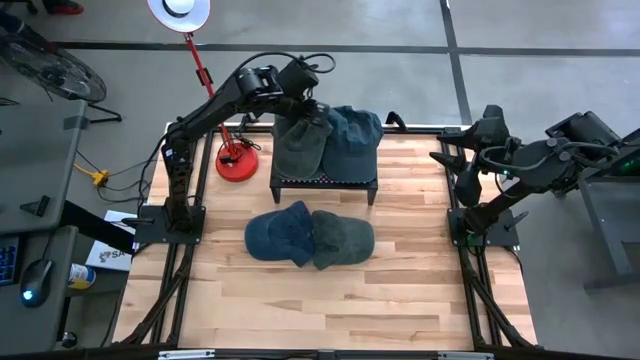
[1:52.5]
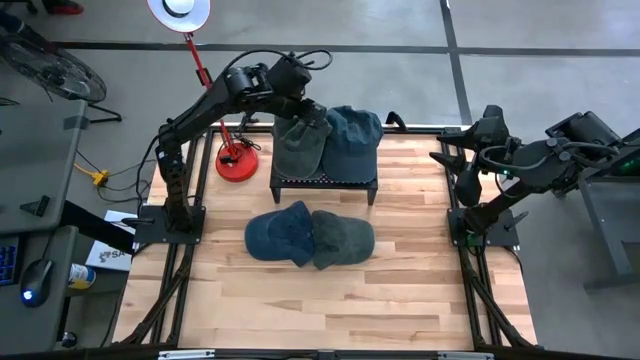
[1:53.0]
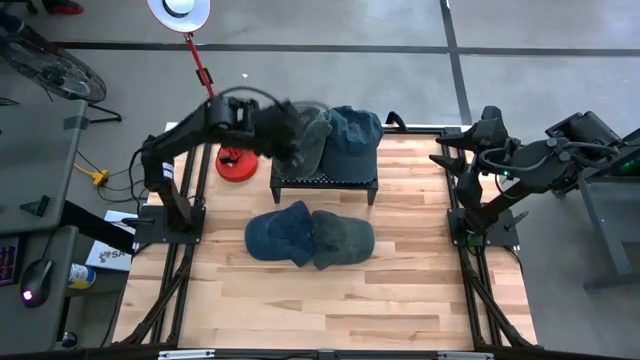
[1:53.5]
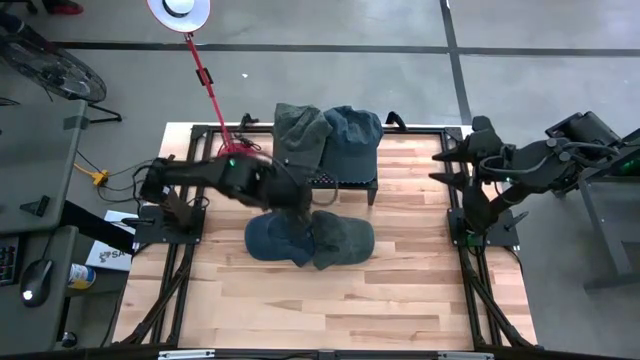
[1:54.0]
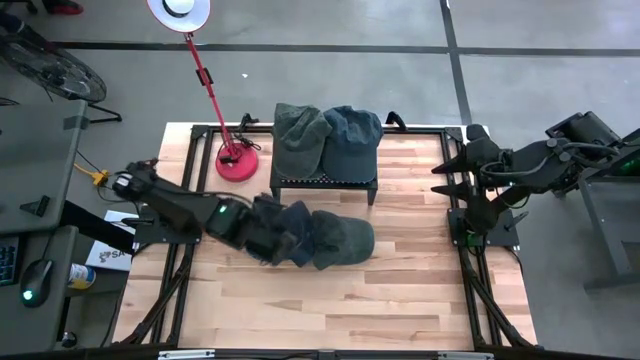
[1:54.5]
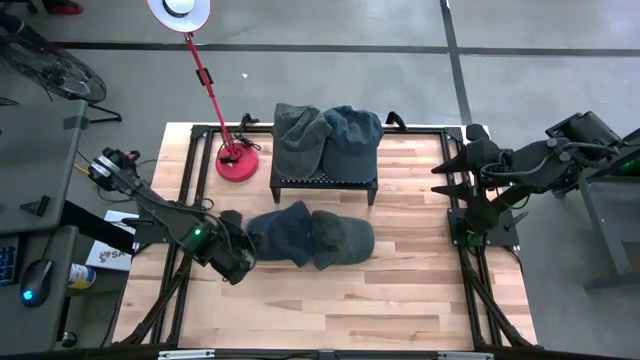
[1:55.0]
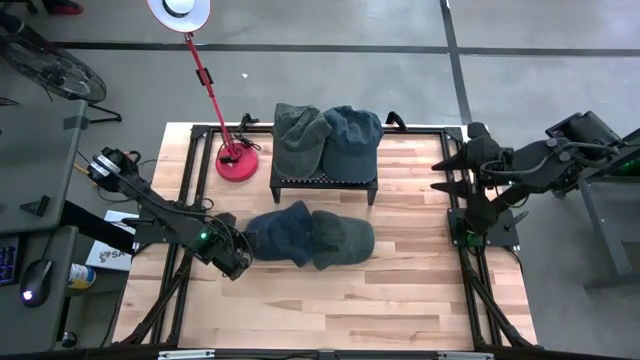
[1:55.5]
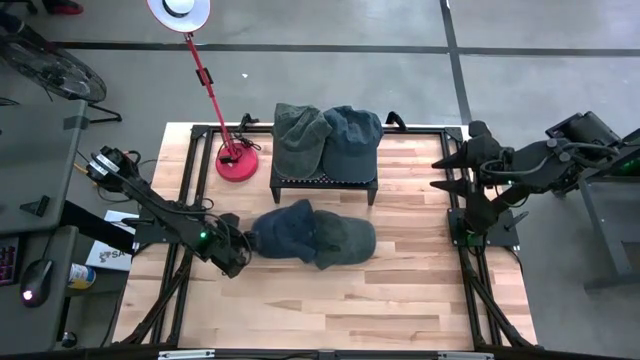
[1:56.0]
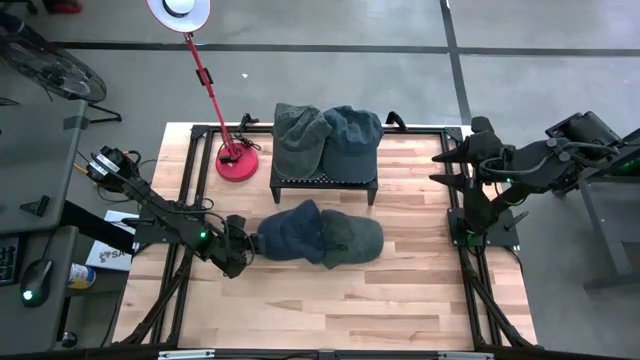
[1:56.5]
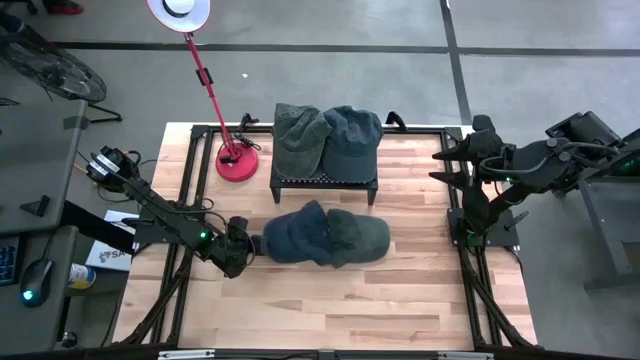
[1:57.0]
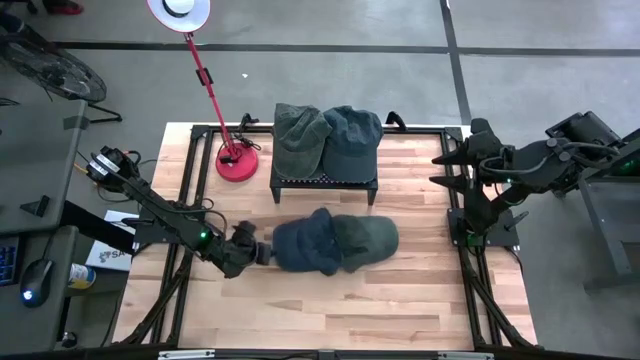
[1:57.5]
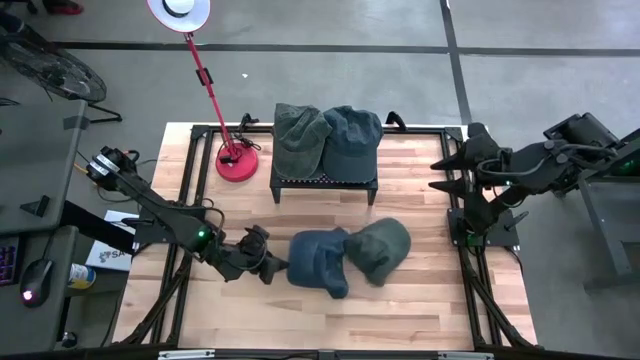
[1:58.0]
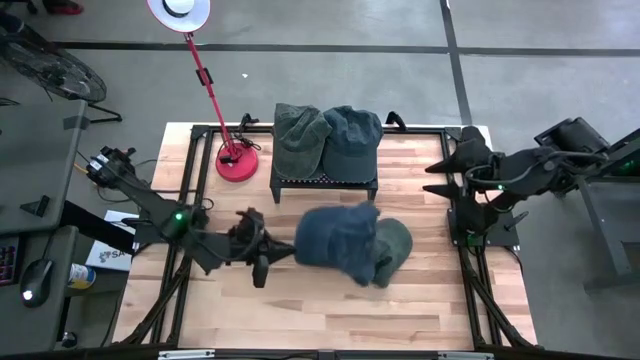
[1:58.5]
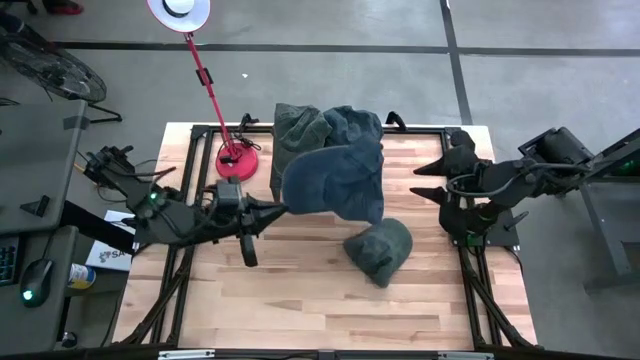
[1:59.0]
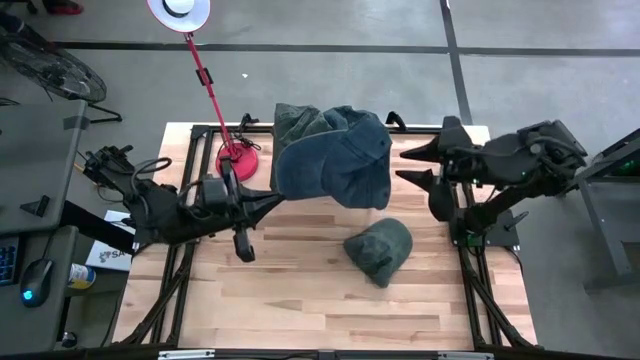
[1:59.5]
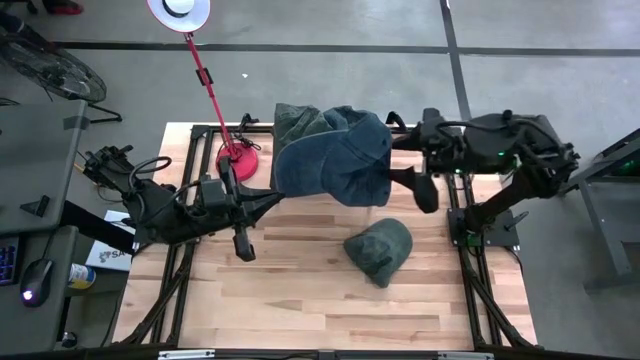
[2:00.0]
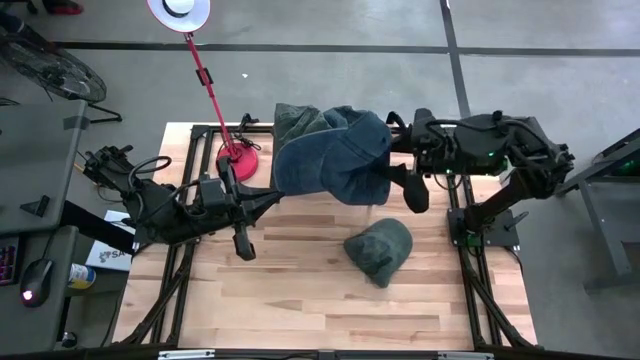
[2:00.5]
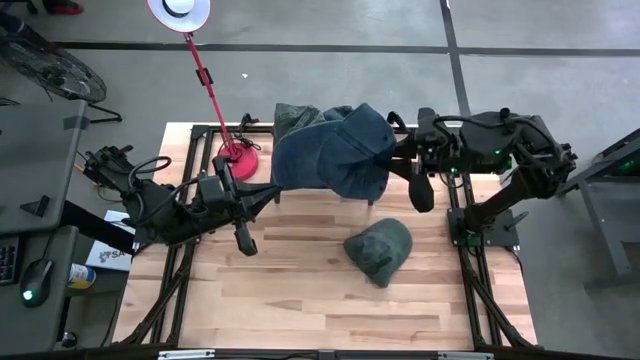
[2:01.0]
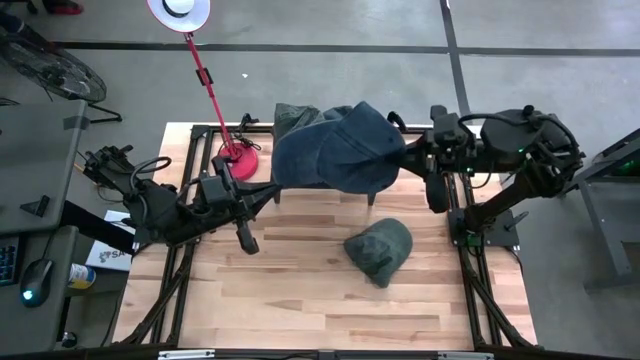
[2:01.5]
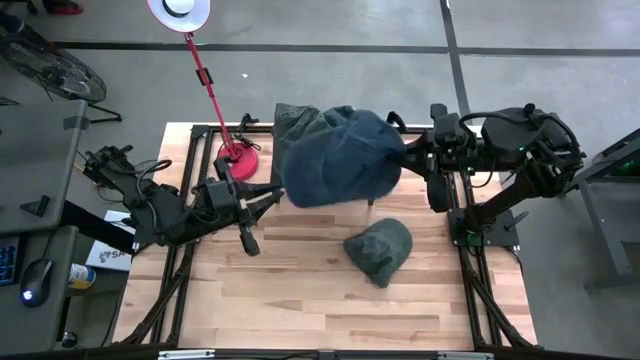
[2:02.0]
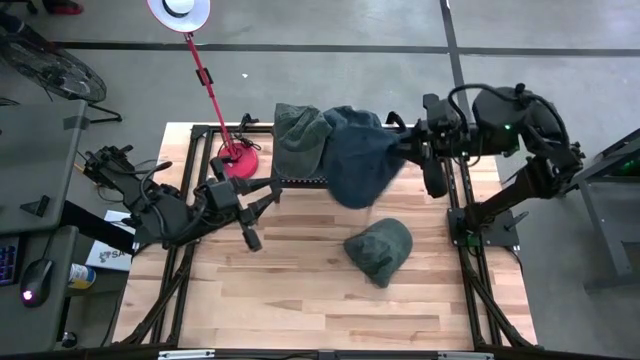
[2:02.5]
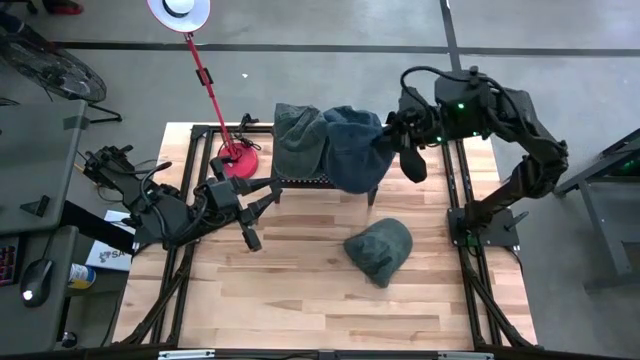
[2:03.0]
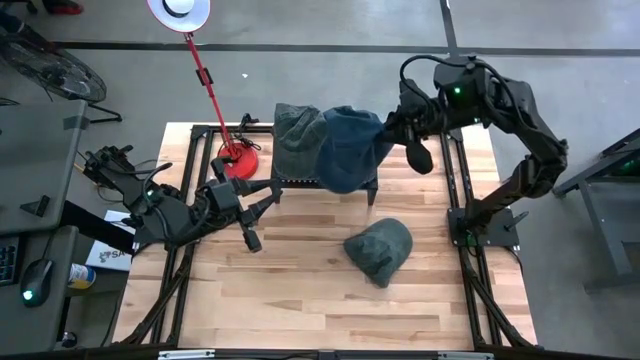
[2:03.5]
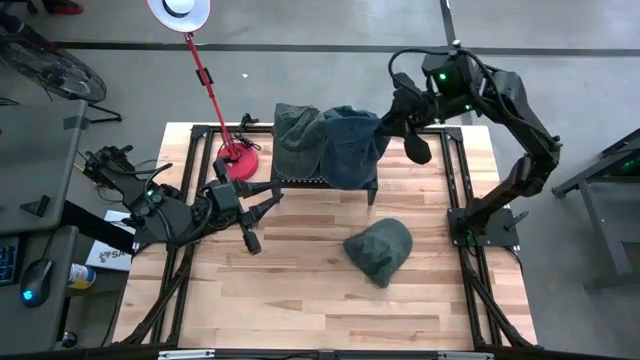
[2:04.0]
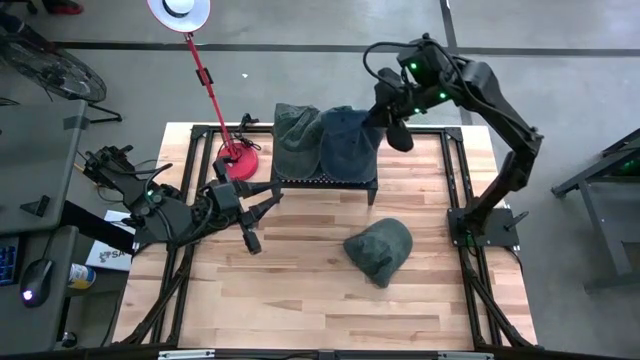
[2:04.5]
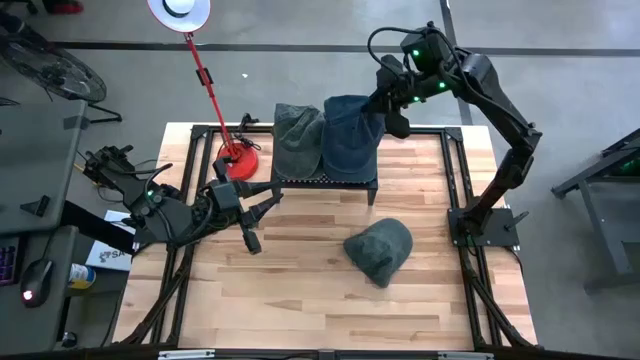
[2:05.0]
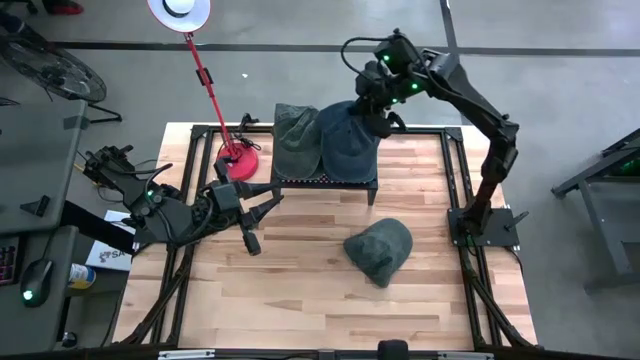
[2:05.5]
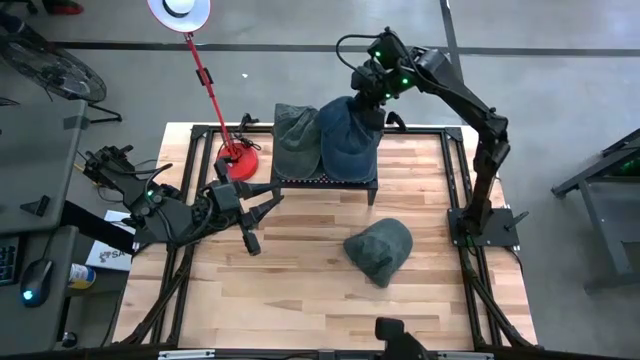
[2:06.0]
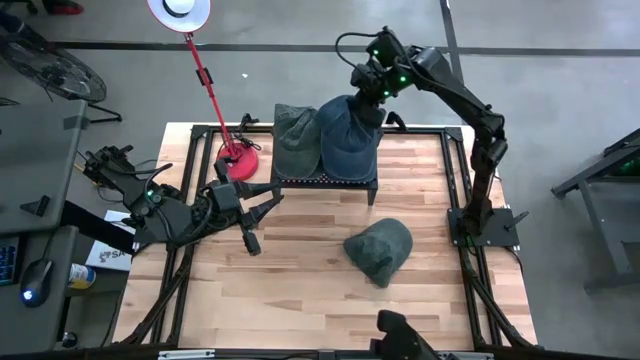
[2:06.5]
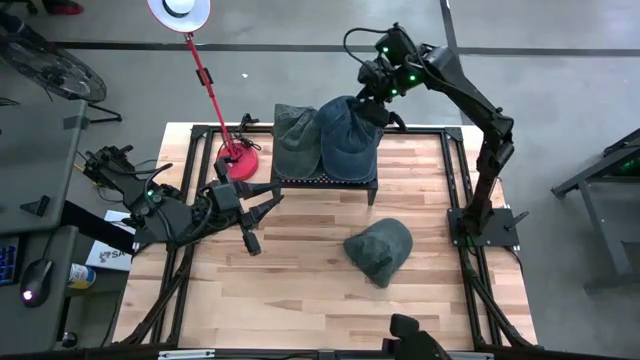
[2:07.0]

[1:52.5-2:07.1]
Task: Pick & Place hat
Stack the blue cap on top of the other blue cap on the shelf

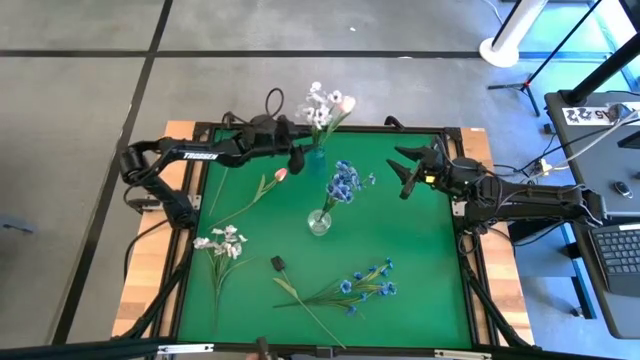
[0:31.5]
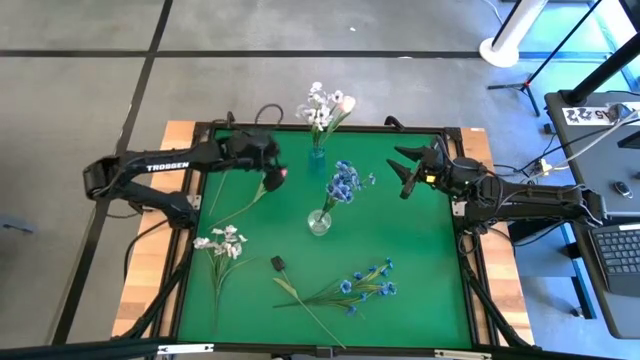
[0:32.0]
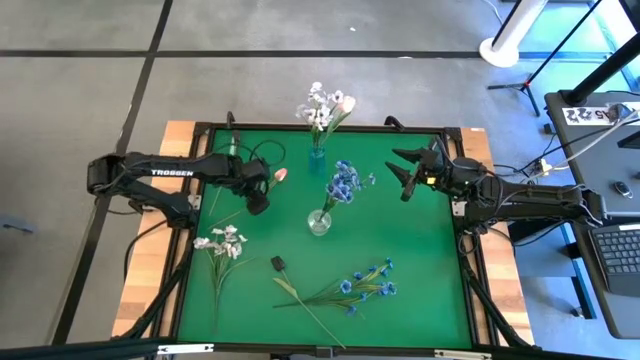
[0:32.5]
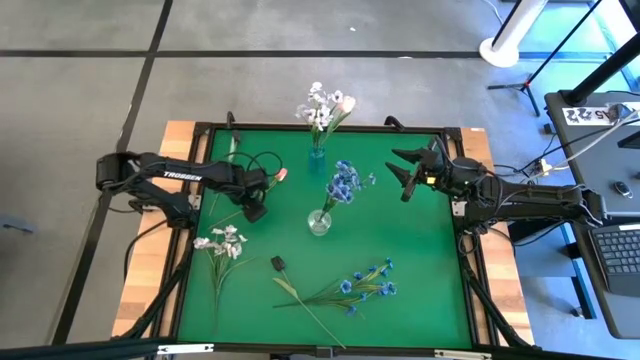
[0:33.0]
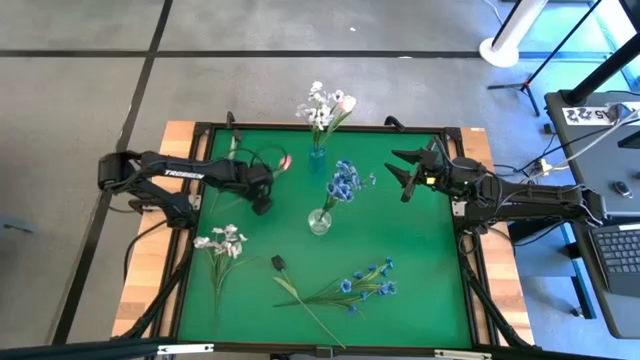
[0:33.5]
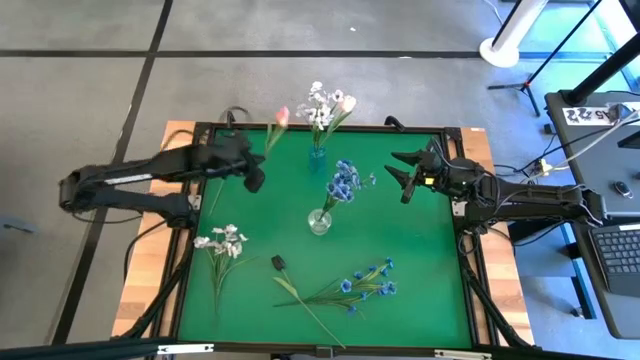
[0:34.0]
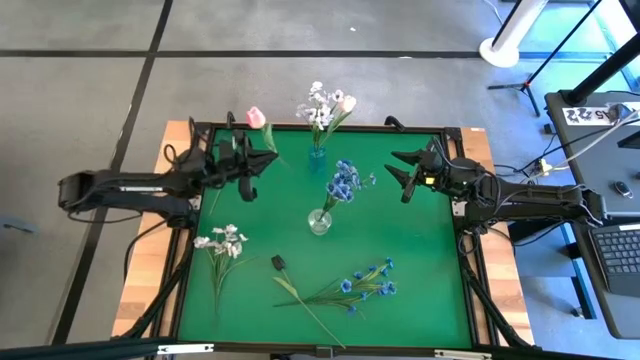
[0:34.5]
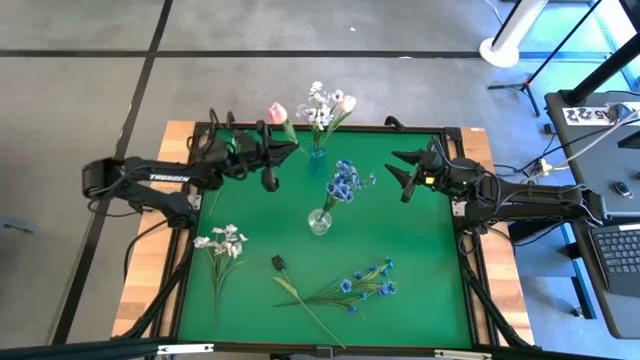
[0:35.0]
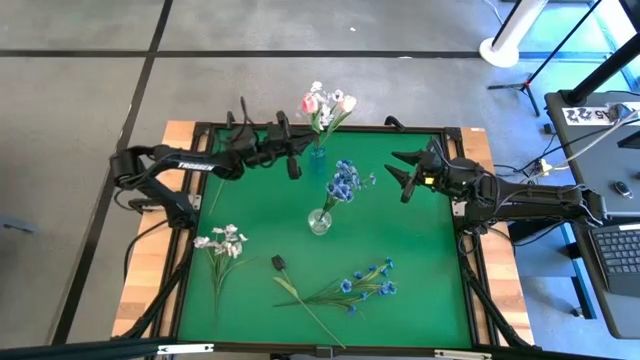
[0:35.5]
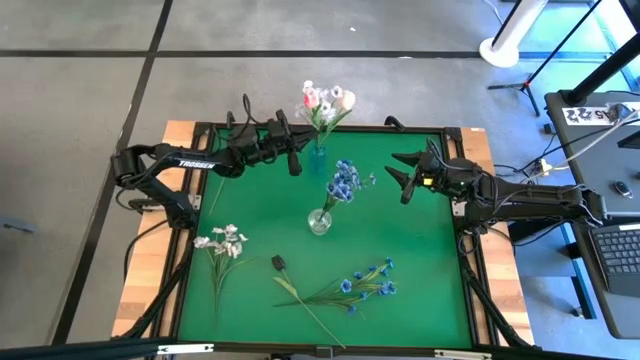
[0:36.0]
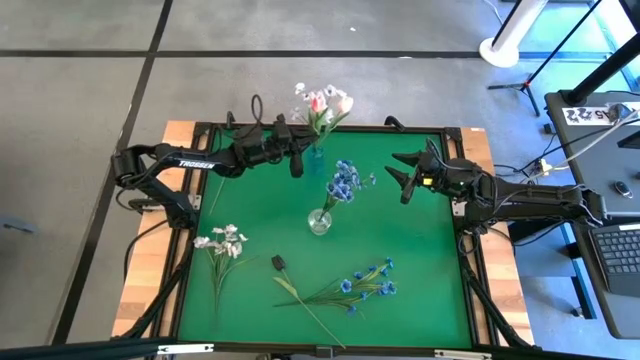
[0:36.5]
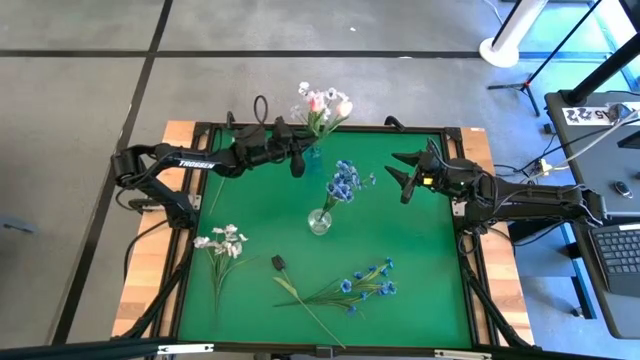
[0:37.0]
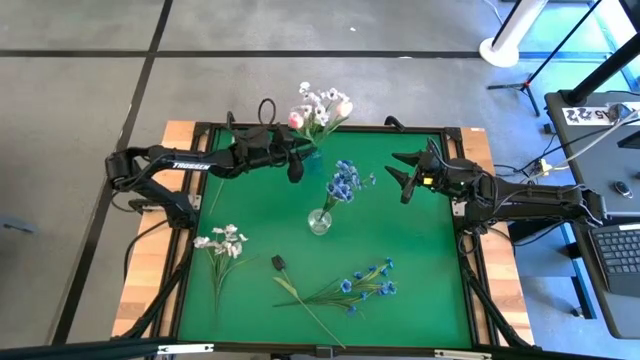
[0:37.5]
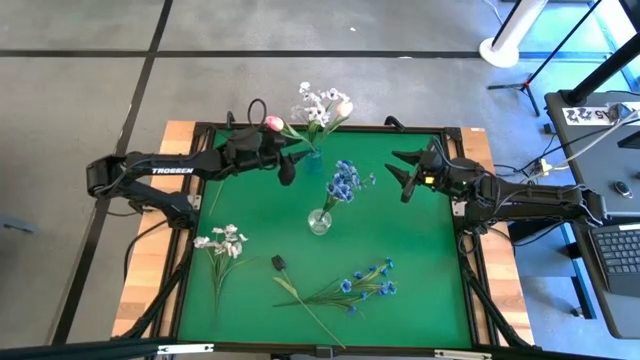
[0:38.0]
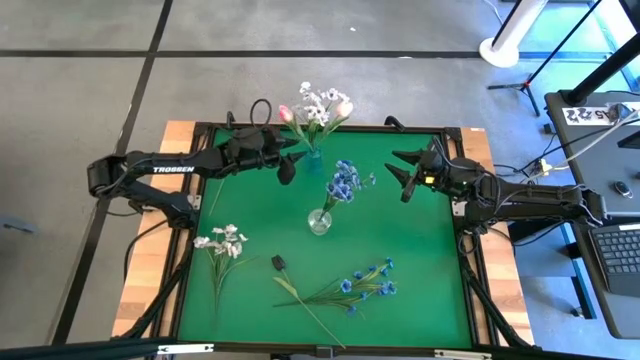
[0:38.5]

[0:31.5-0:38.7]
Task: Sort flowers into vase by color
Put the pink tulip into the blue vase
